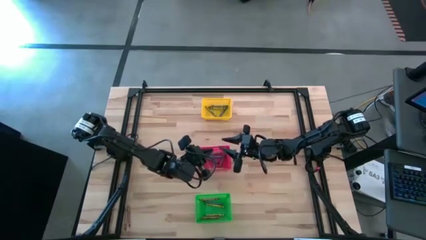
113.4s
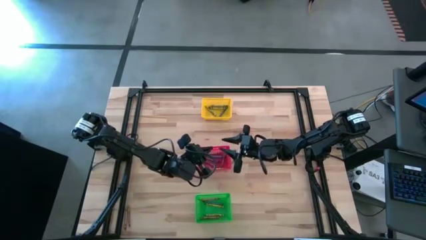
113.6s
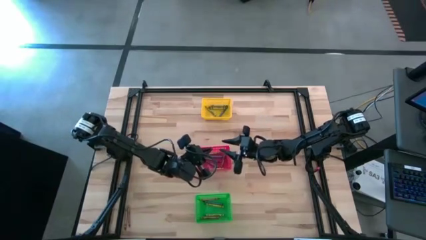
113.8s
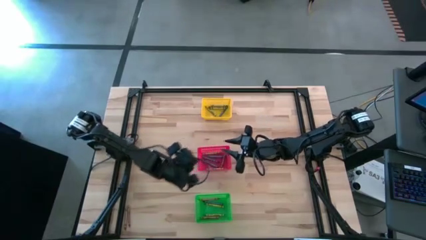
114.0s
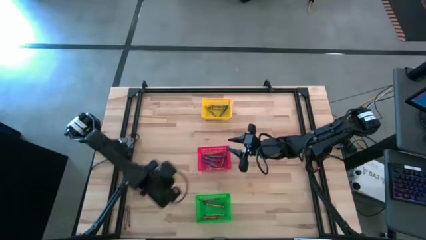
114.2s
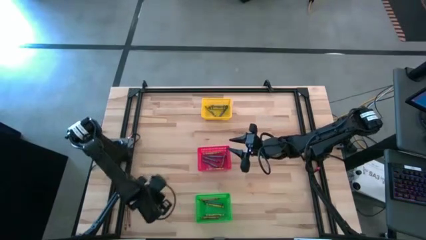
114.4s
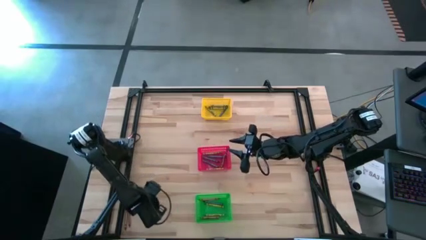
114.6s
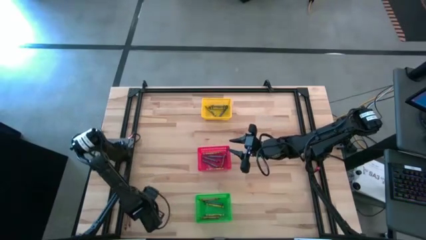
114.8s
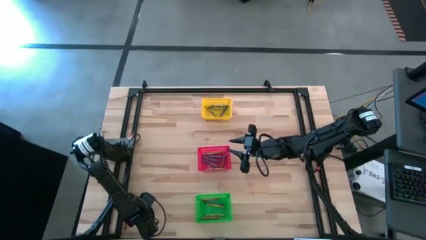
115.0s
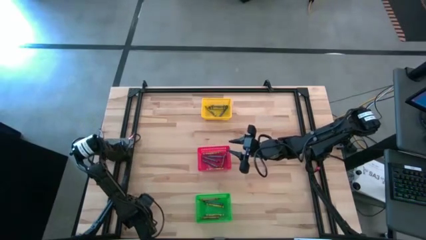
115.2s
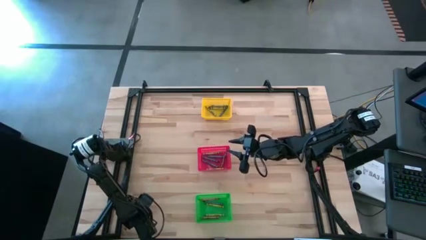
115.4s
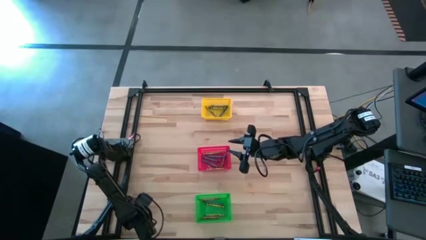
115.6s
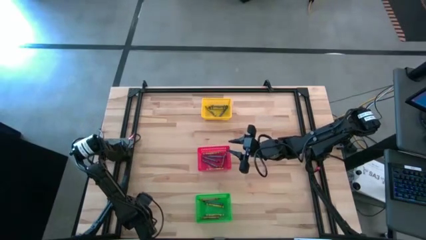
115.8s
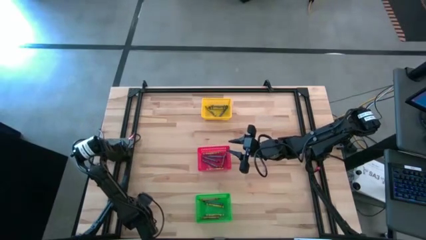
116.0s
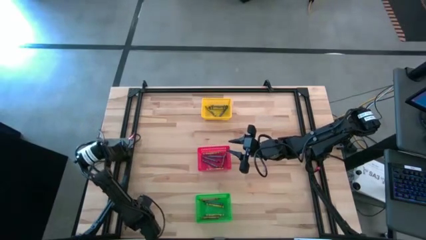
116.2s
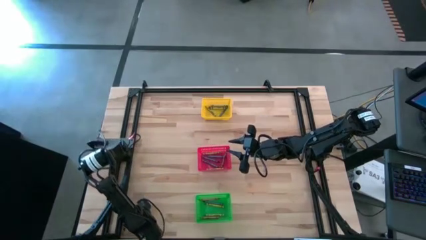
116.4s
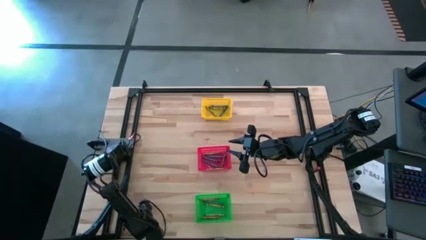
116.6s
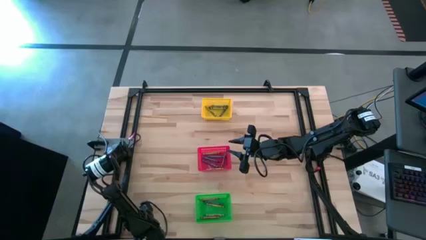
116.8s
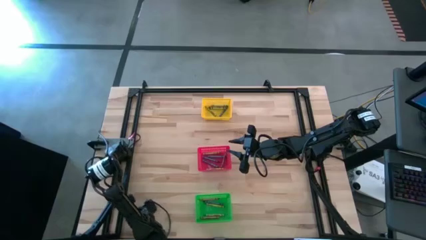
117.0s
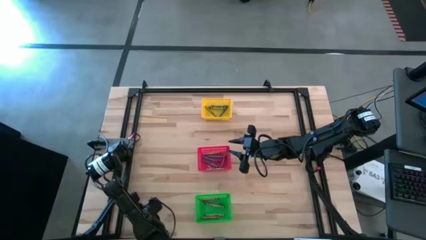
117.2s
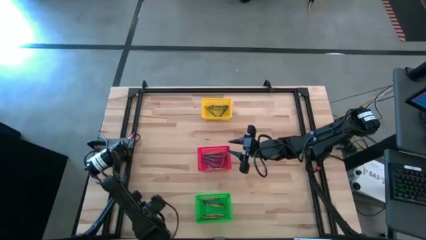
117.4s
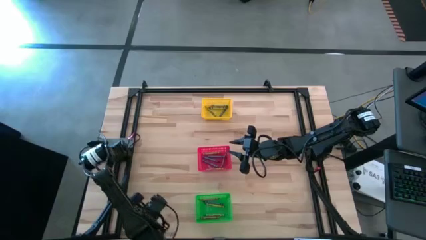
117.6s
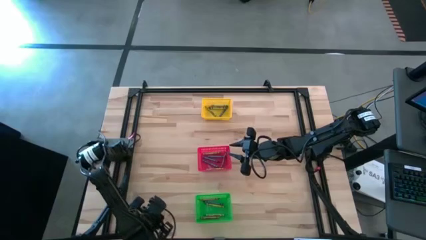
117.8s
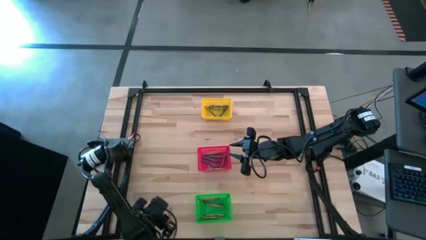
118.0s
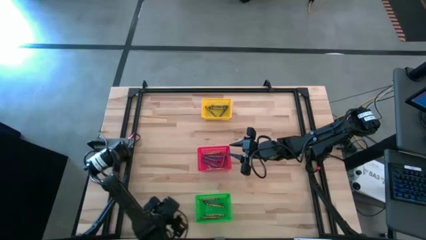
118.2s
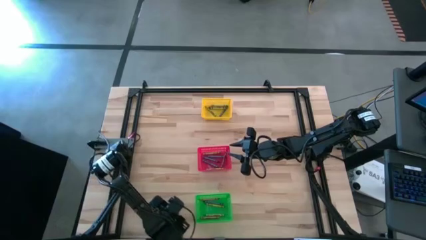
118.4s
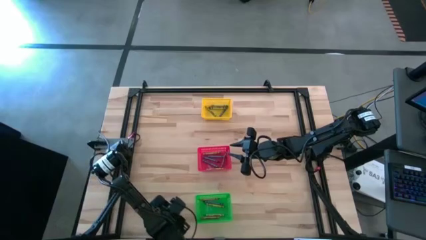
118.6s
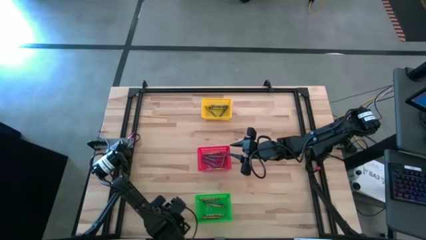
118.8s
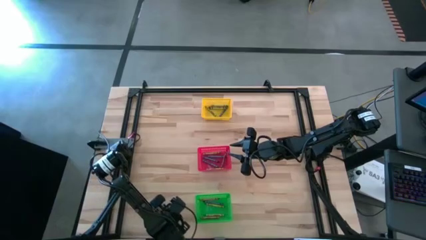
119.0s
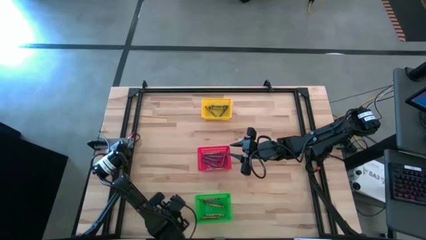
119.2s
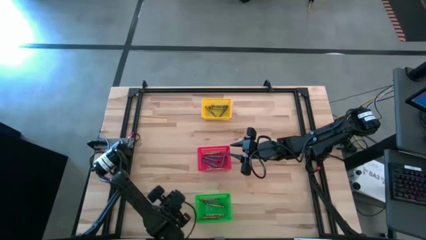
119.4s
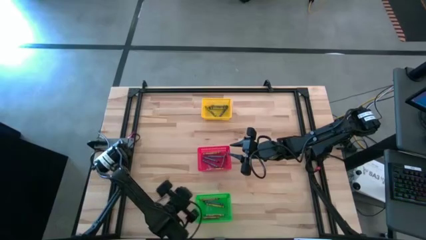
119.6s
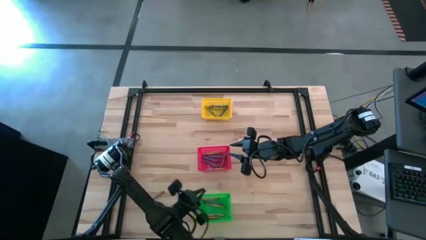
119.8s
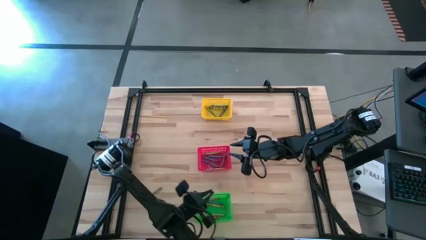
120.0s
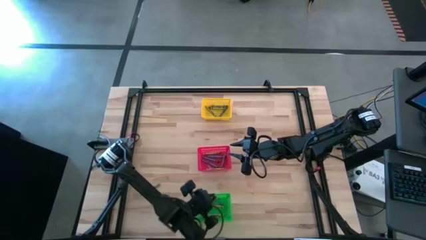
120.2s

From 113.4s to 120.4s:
Task: Sort crayons
Put the brown crayon into the bottom green bin

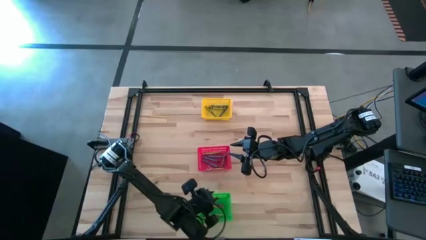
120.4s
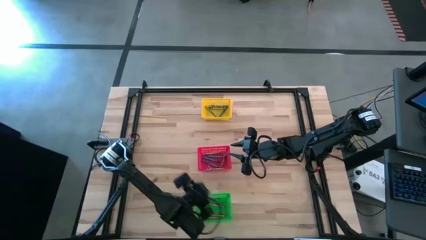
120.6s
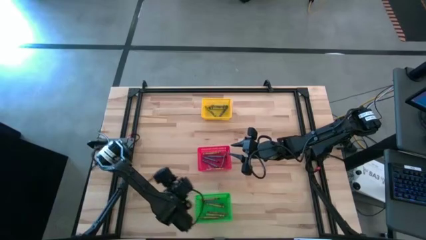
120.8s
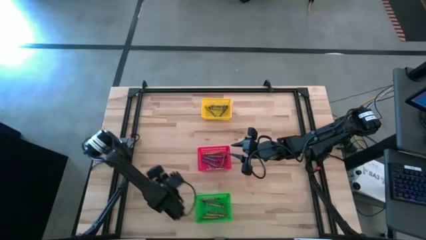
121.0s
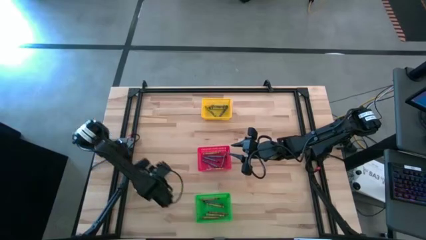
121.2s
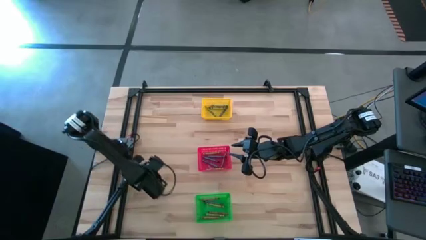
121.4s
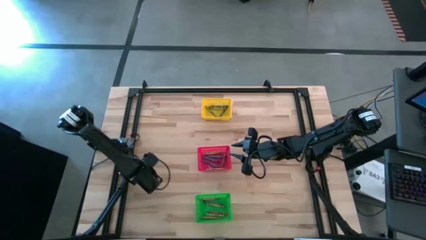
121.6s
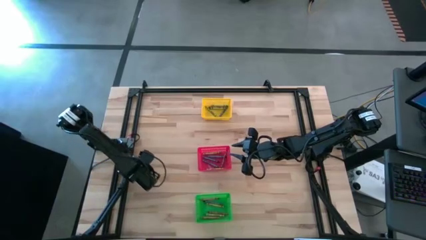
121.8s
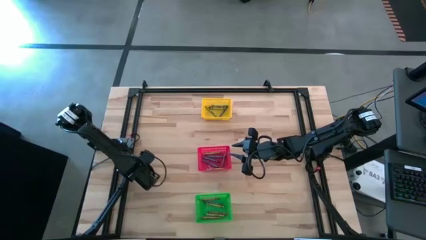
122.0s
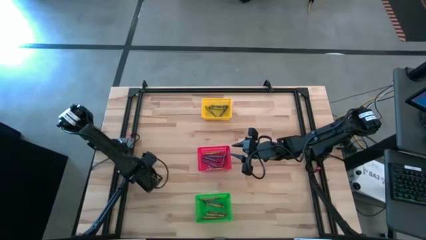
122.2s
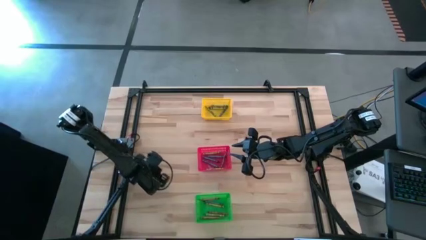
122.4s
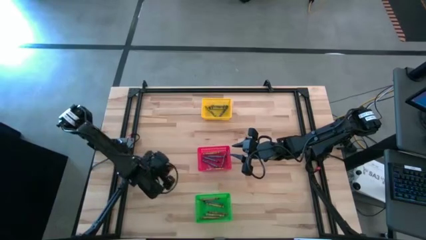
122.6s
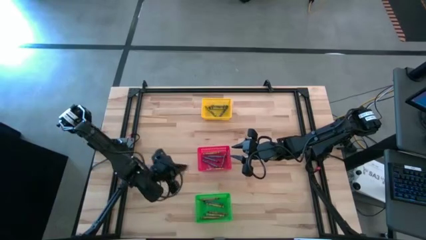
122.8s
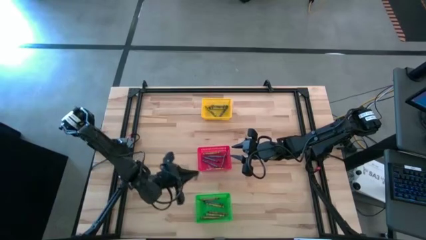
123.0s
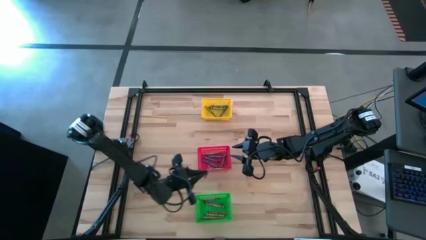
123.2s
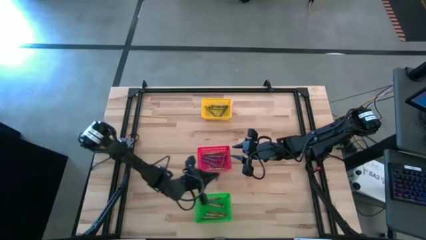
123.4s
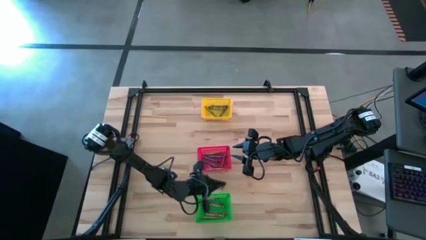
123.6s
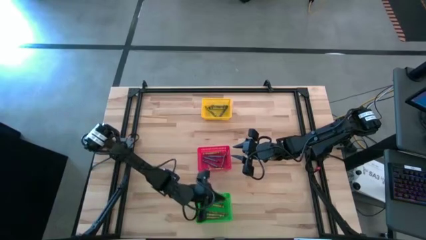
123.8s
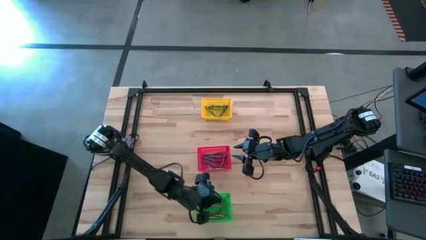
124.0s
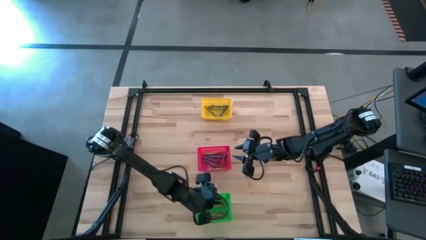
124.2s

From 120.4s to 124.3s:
Put the brown crayon into the green bin
